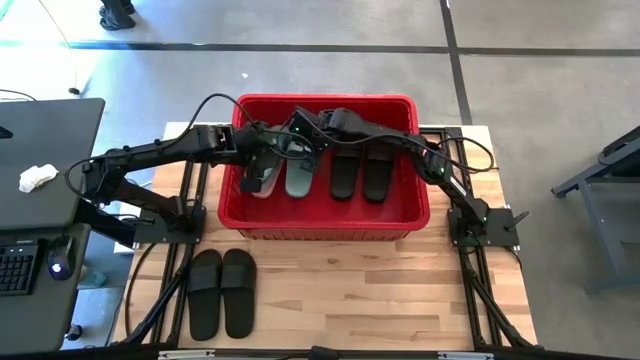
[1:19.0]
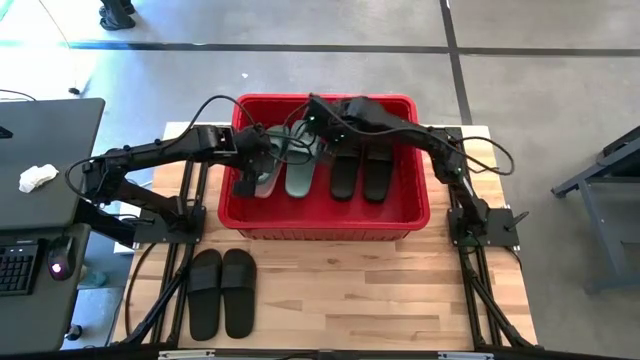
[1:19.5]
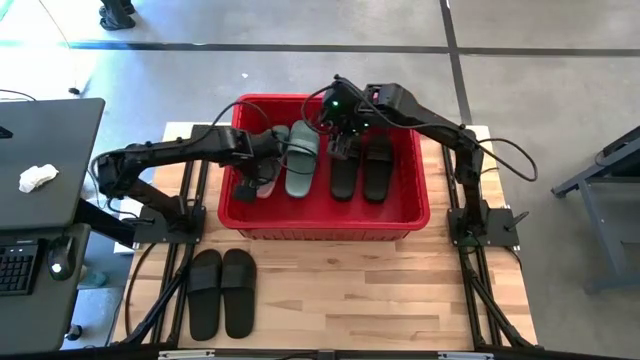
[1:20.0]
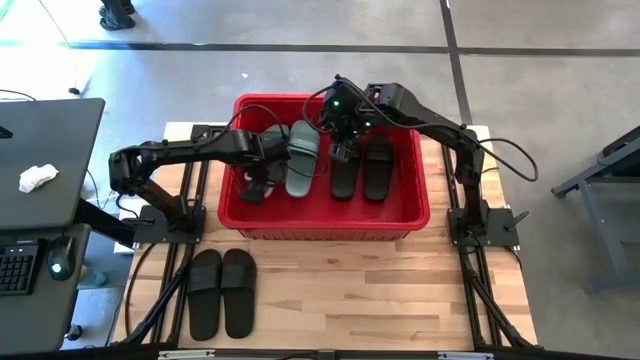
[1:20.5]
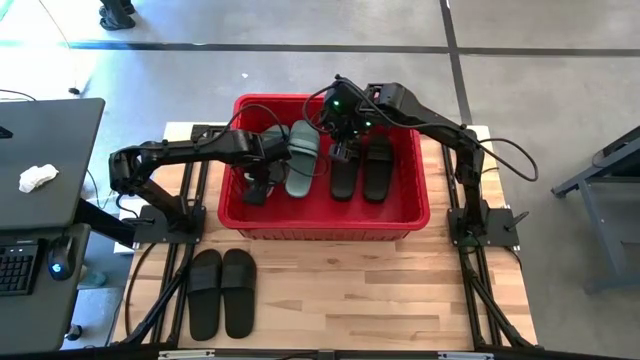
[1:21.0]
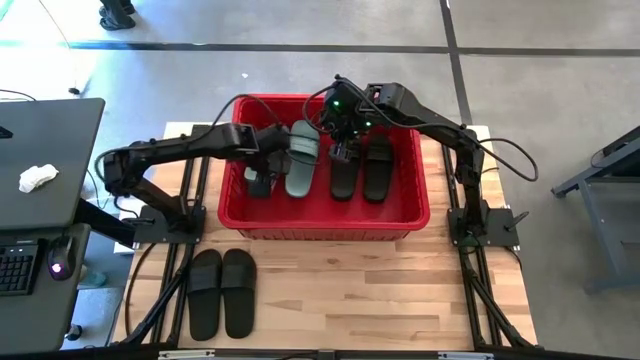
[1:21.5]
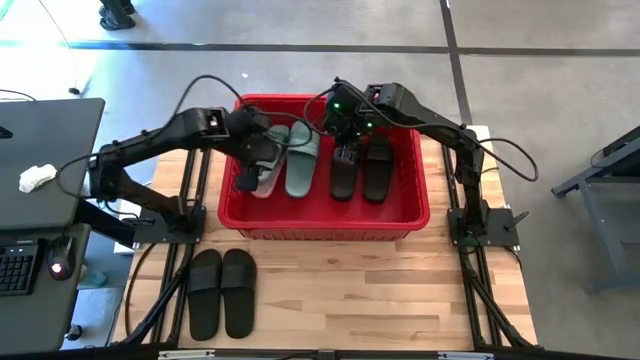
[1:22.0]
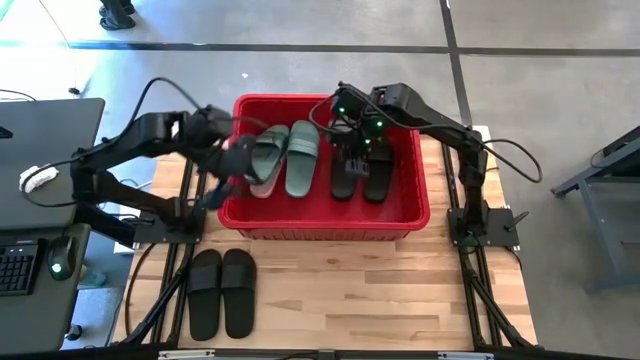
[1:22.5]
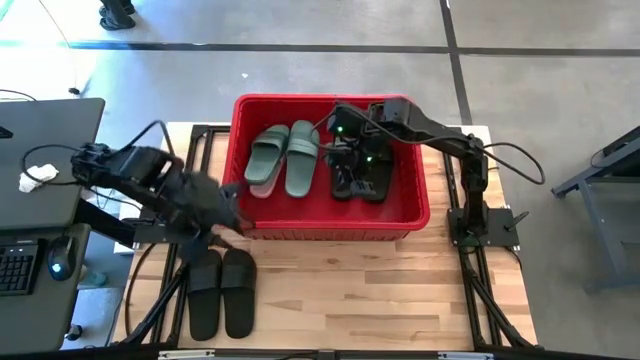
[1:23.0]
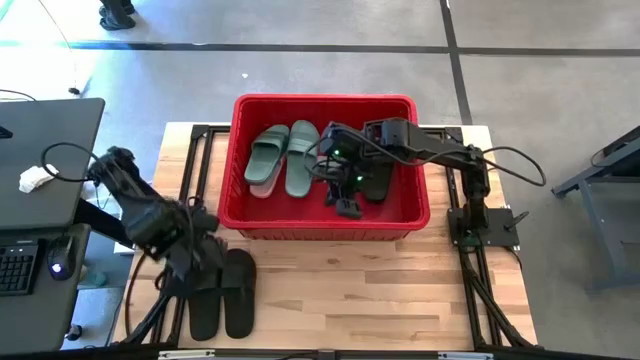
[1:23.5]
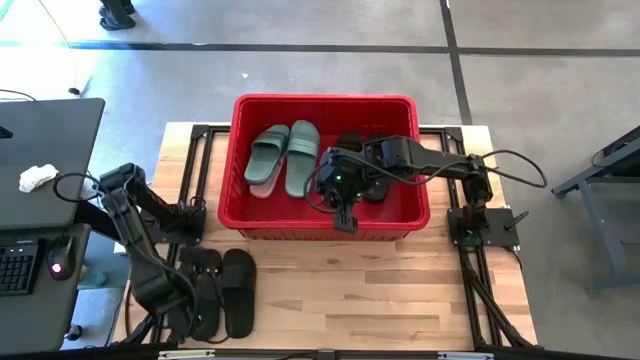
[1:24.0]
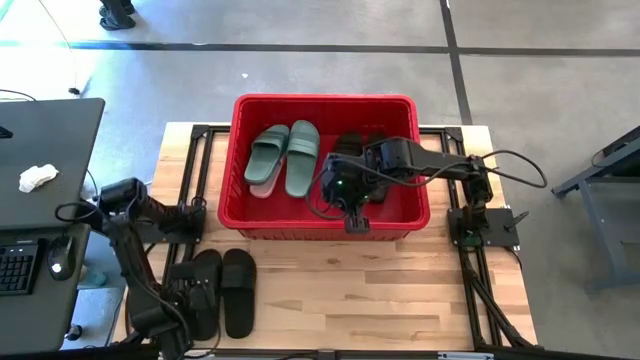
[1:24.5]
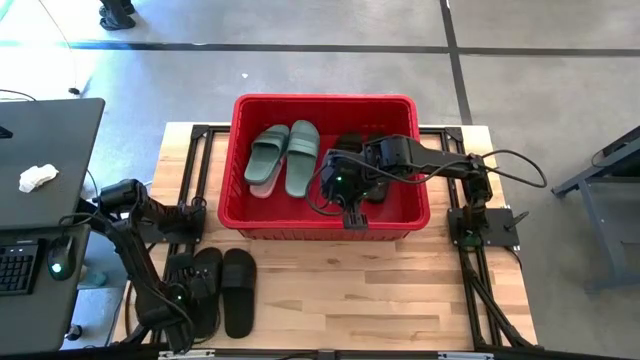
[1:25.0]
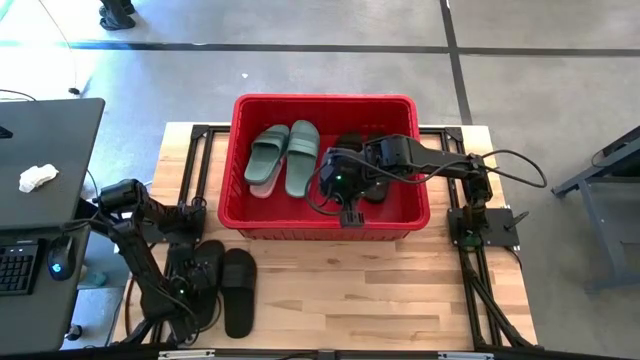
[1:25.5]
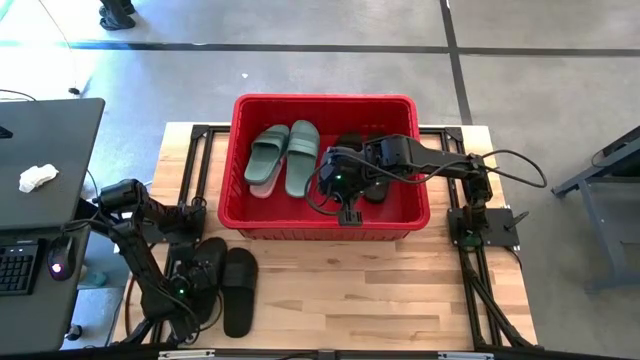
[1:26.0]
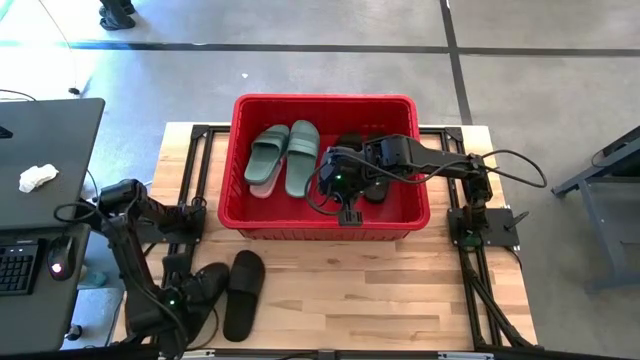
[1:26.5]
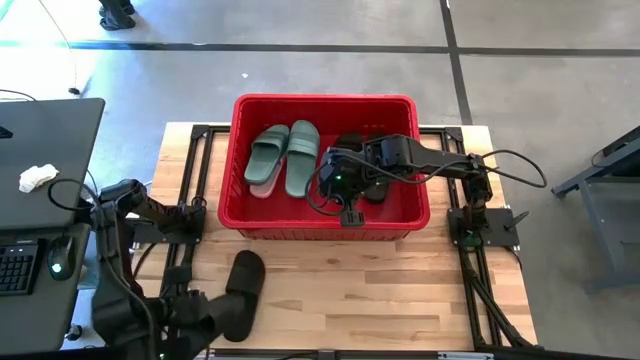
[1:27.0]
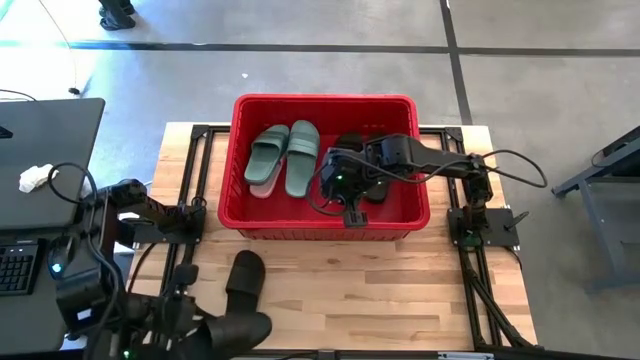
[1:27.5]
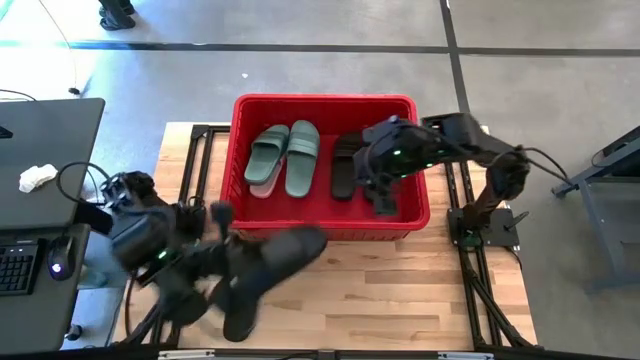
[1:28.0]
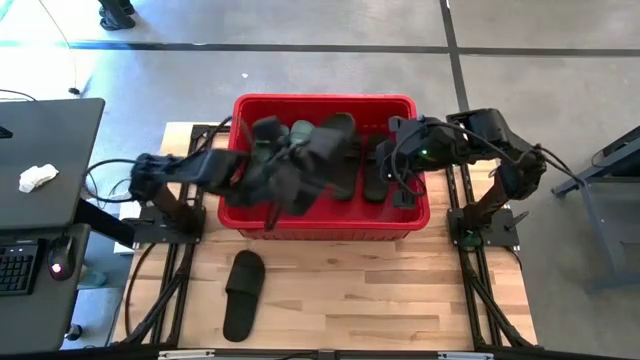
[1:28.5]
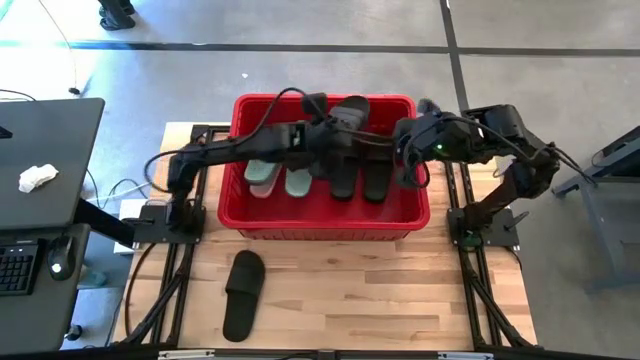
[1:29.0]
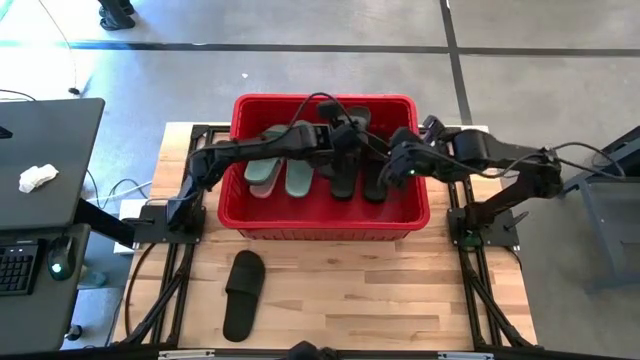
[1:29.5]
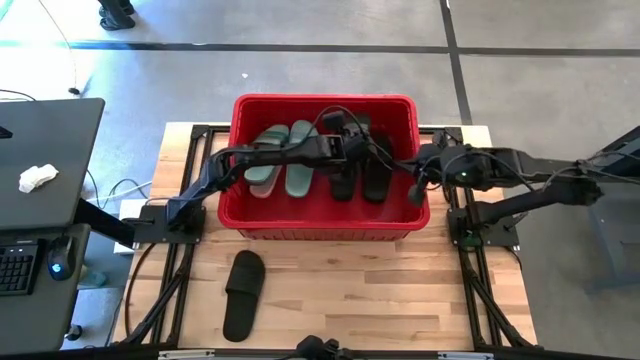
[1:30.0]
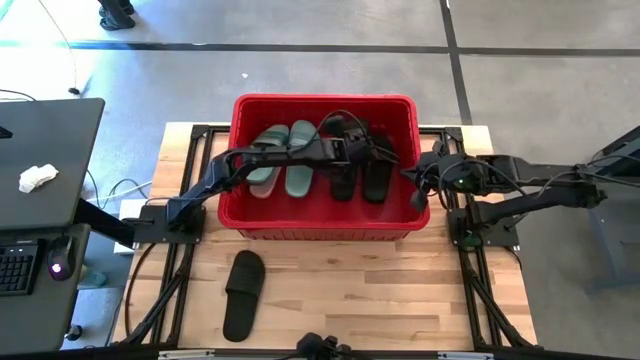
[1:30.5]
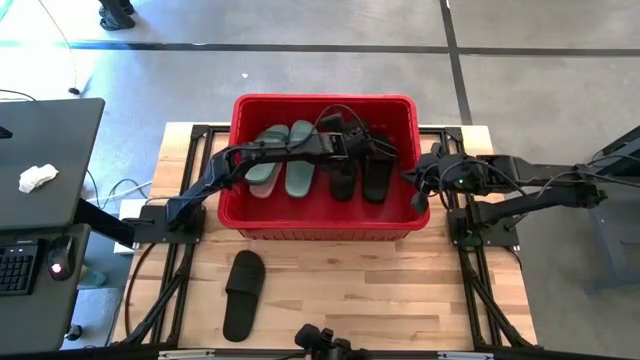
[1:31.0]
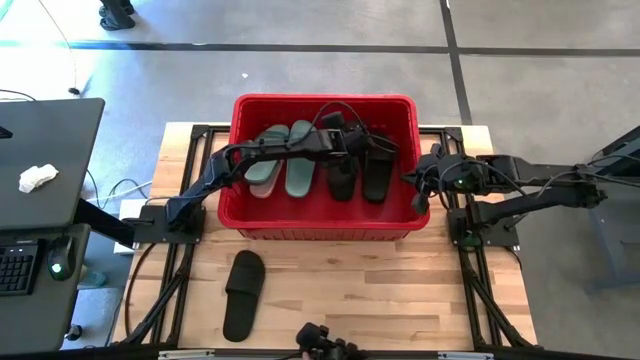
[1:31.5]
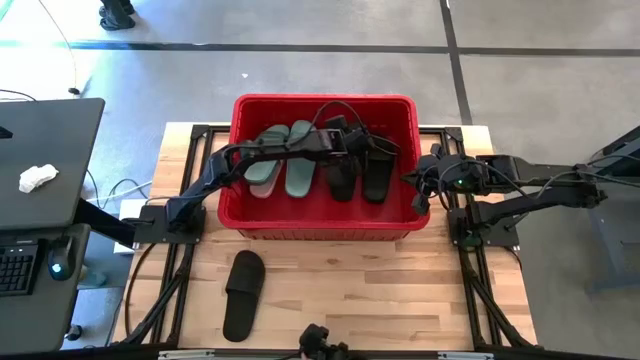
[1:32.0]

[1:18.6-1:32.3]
Task: Pick and place slides into bin
Put the black slide into the red bin

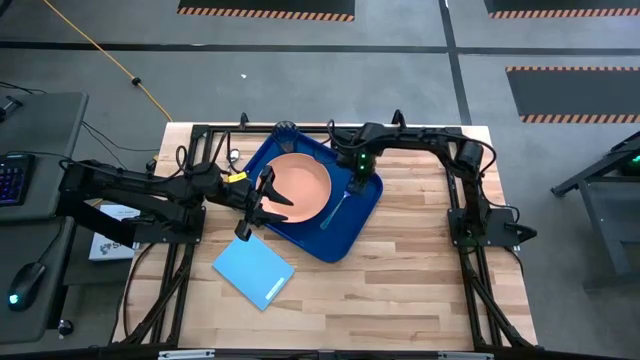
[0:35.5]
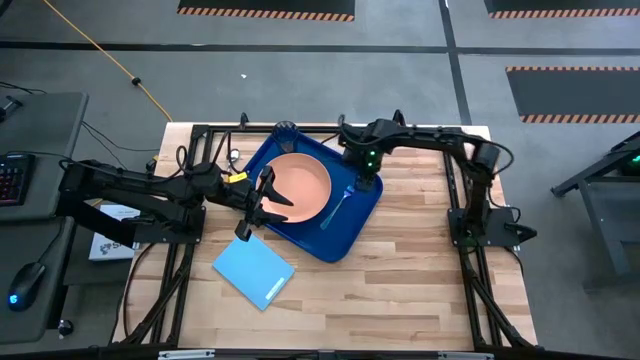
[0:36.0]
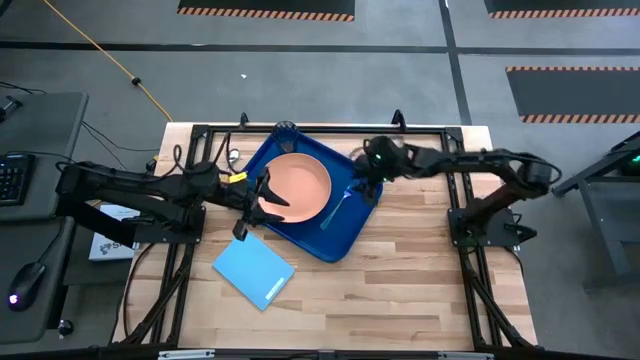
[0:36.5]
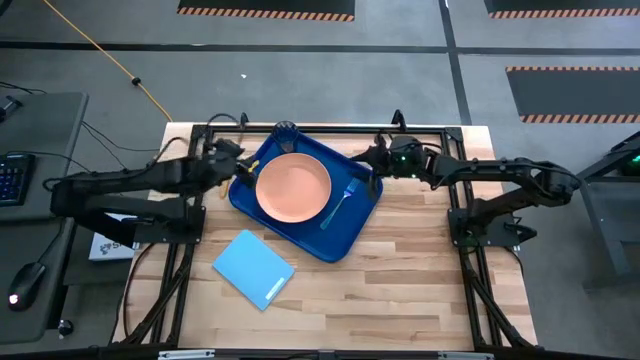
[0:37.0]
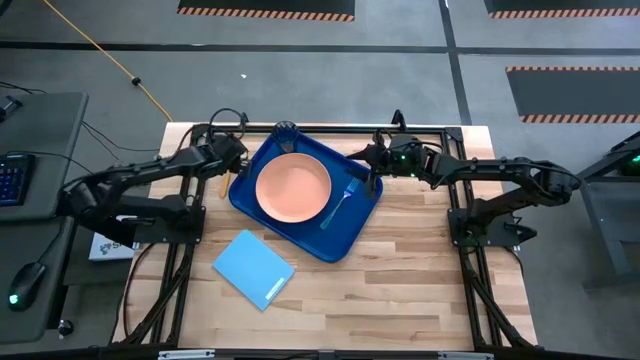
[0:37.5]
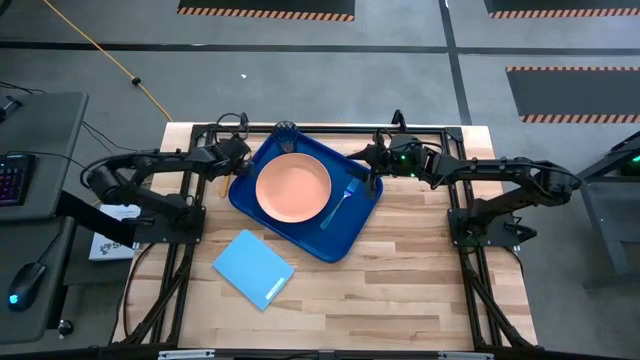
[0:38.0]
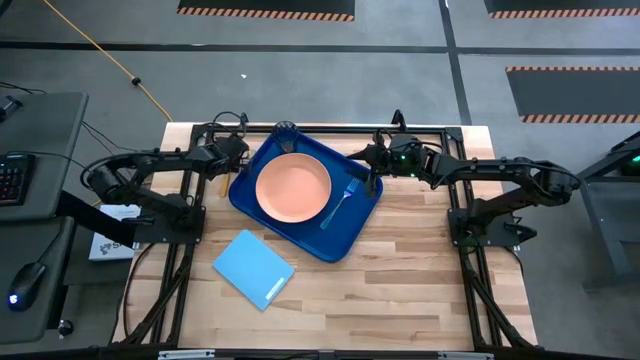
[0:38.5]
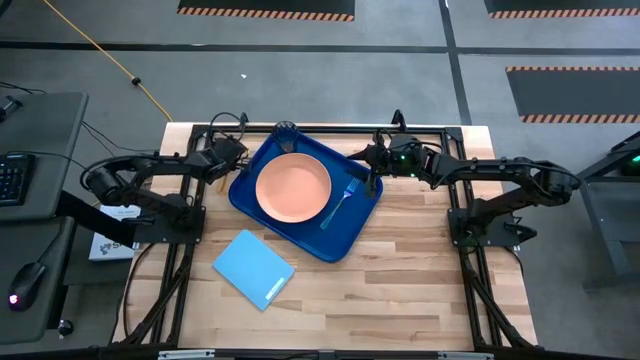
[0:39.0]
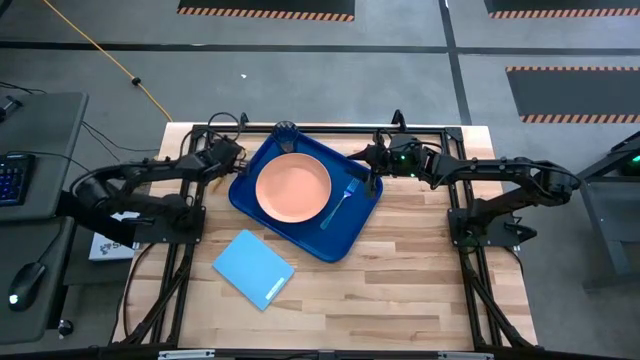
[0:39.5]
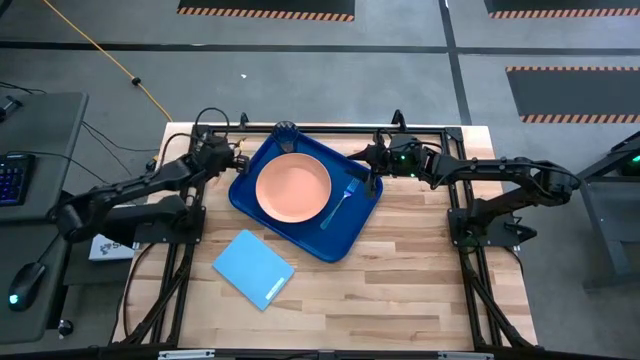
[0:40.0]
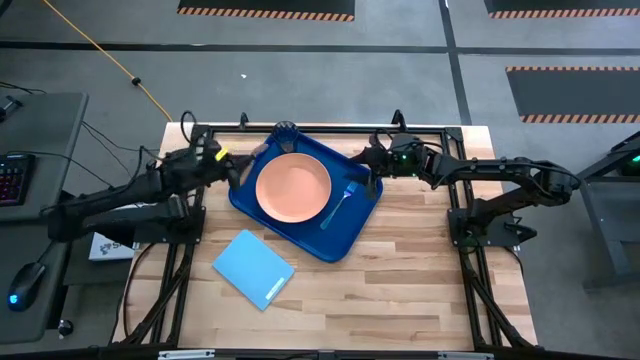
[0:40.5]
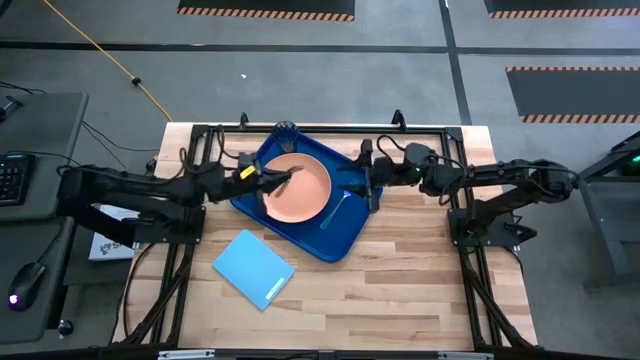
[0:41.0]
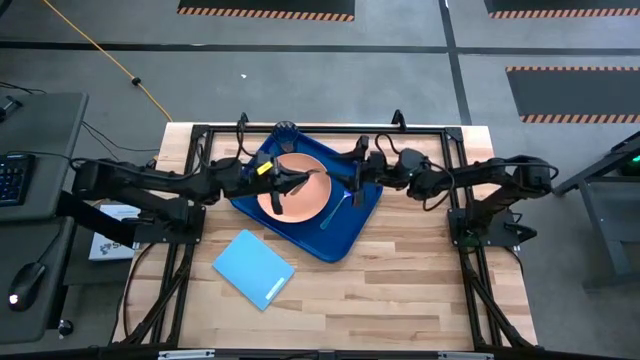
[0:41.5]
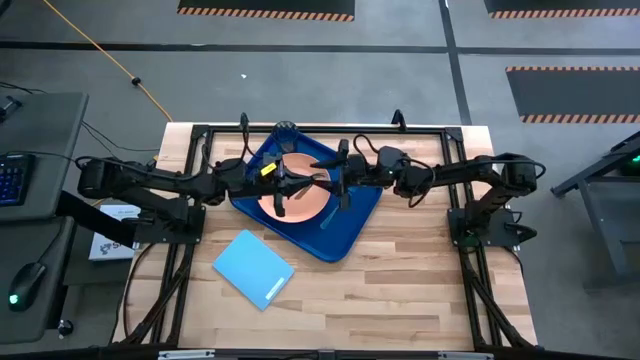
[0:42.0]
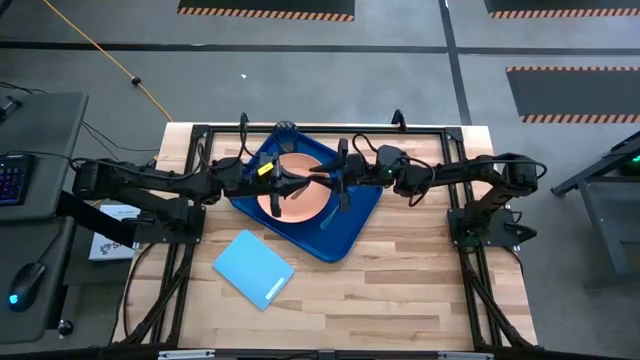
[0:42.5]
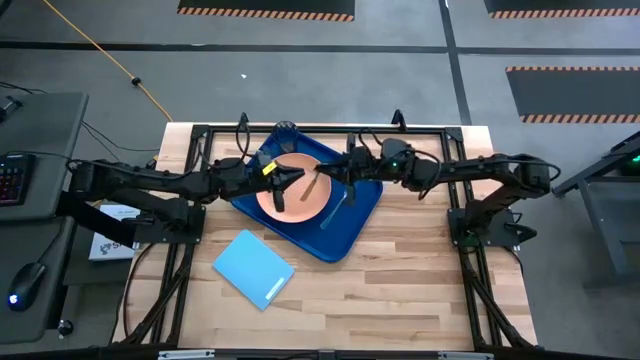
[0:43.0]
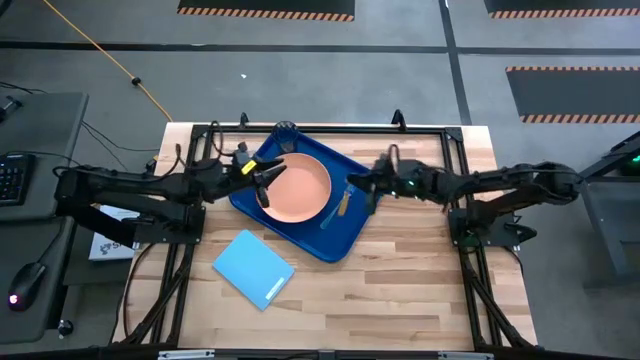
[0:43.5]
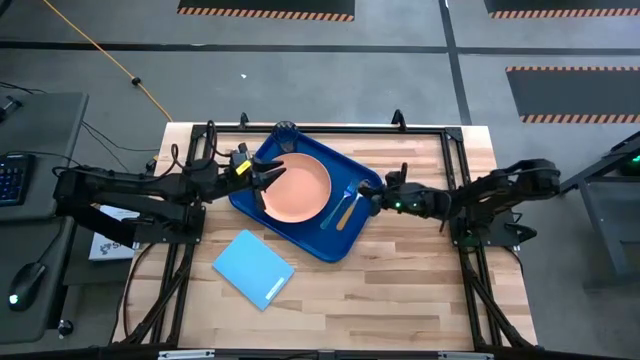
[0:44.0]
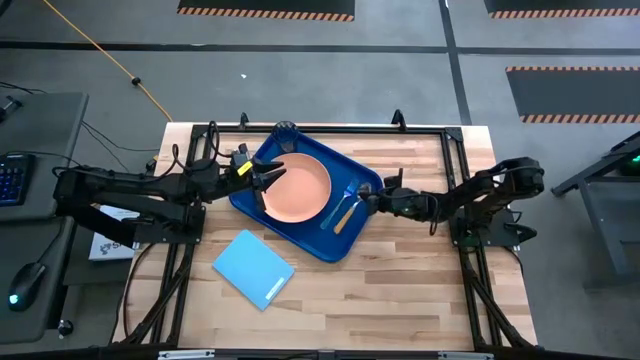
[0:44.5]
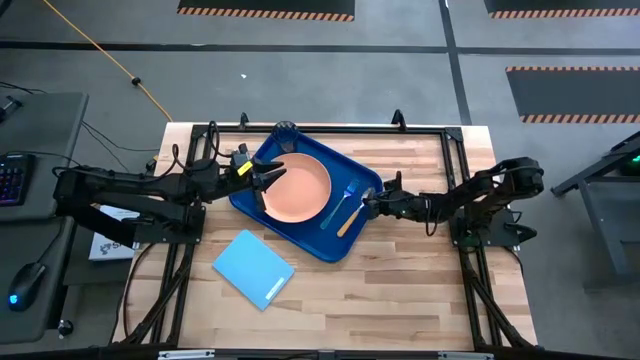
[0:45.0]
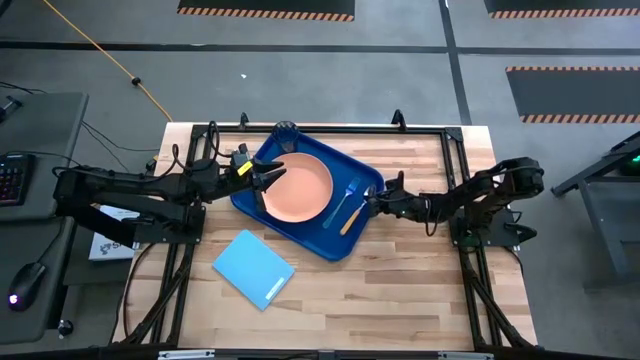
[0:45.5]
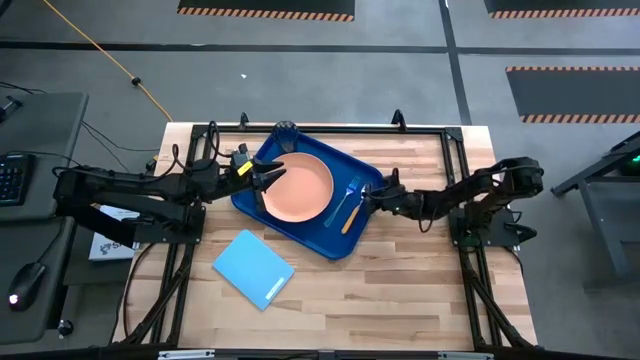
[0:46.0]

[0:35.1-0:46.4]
Task: Pick and place plate/cup/fork/spoon on tray
Put the orange spoon on the blue serving tray to the right of the blue fork
